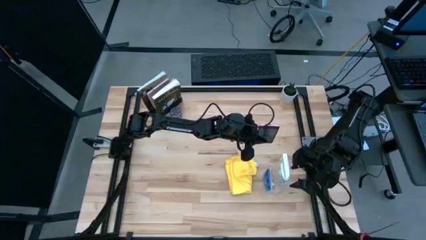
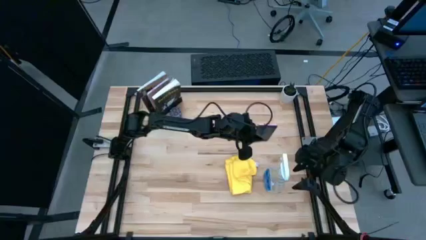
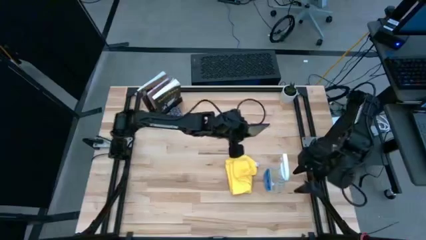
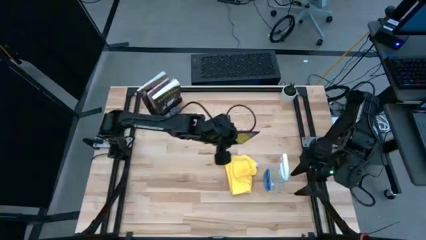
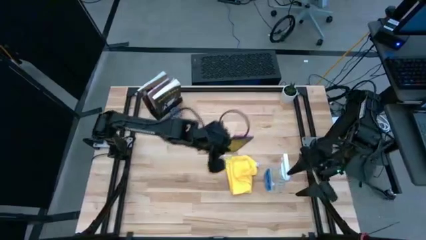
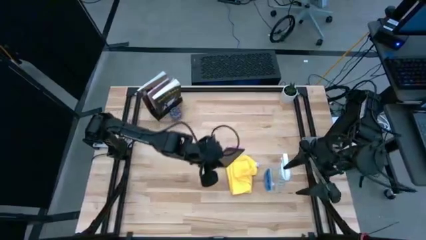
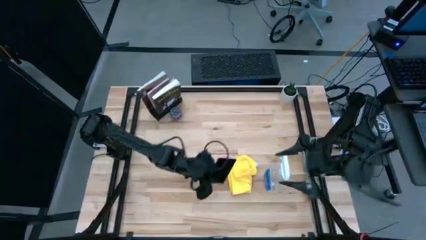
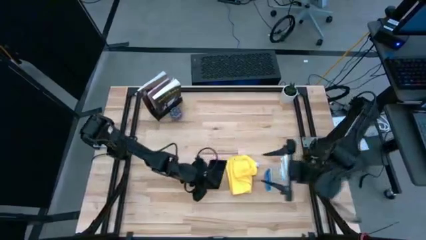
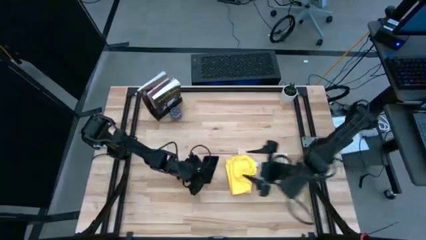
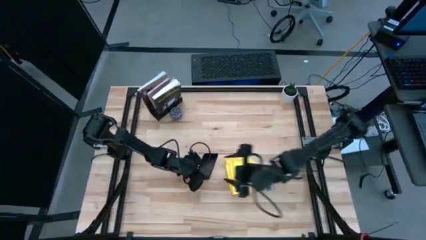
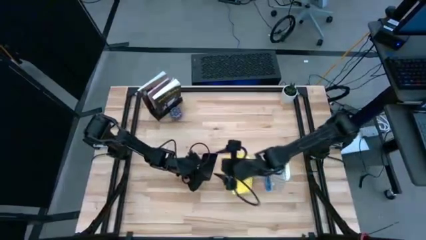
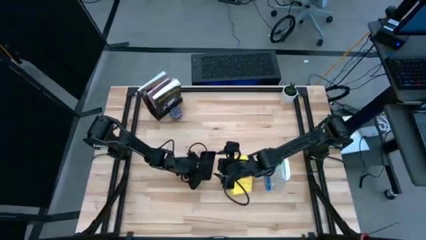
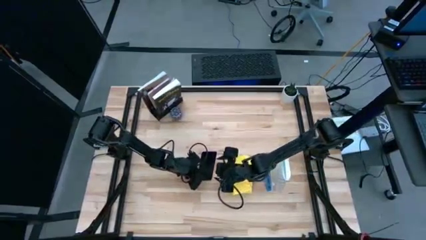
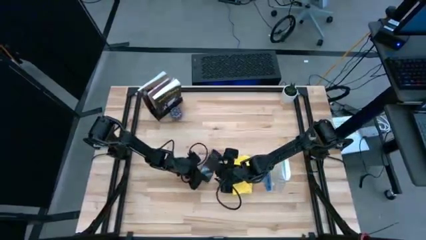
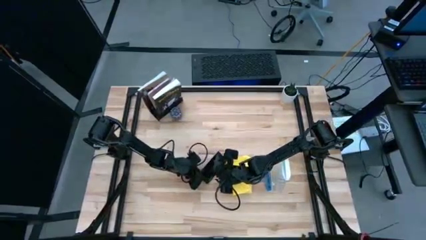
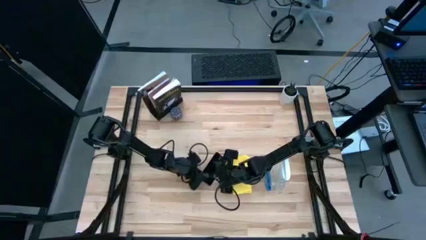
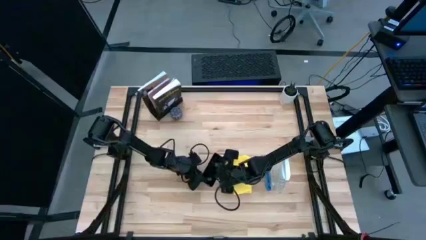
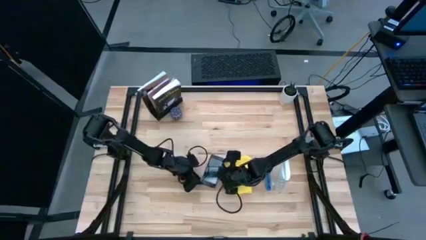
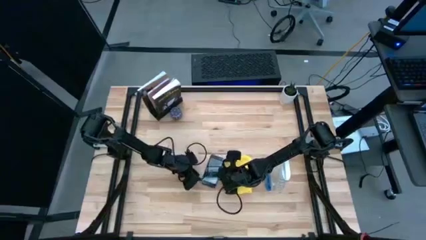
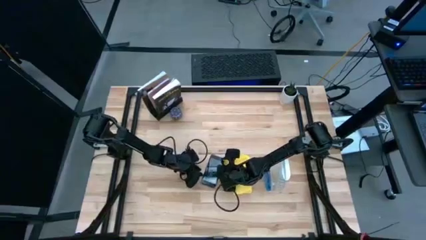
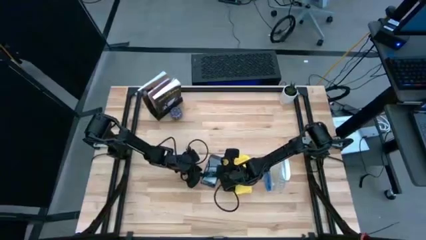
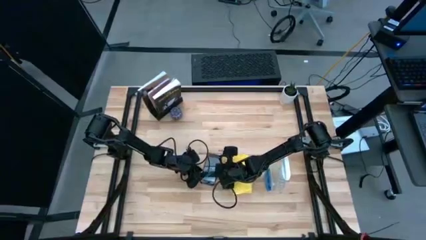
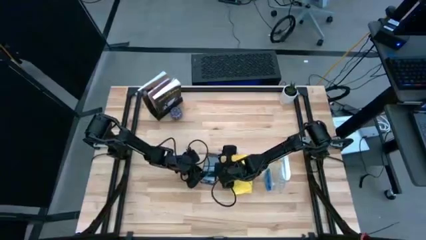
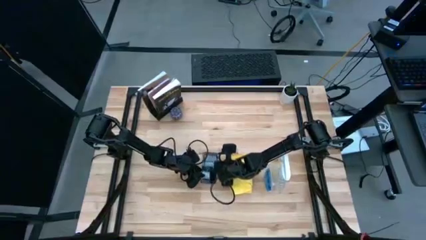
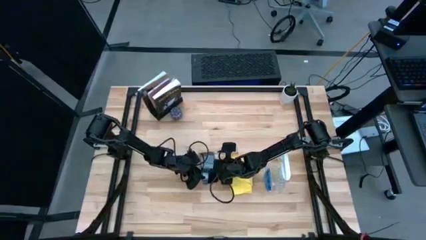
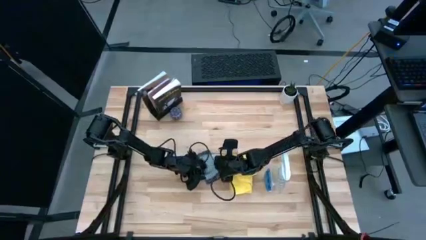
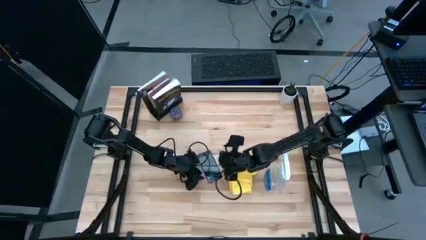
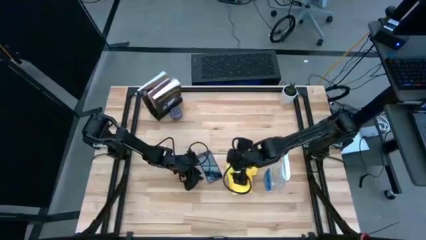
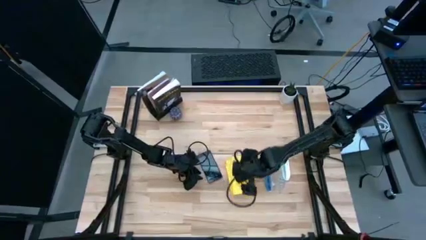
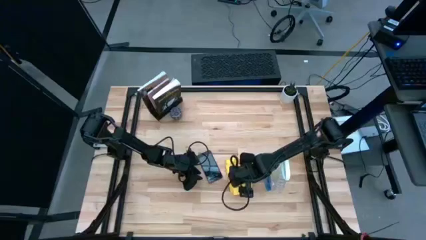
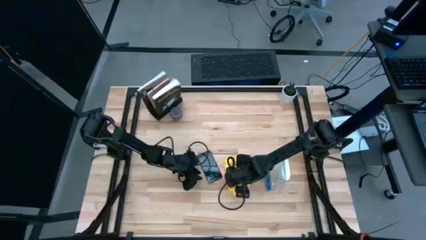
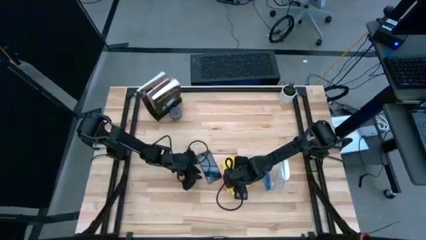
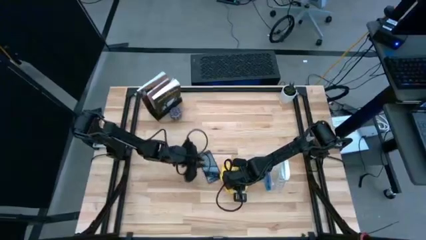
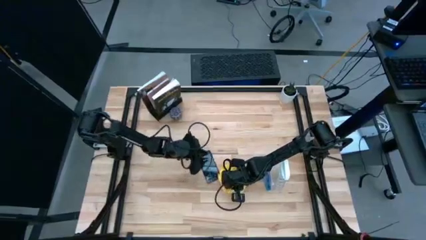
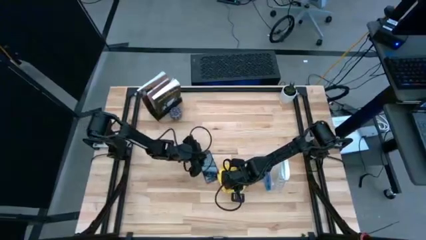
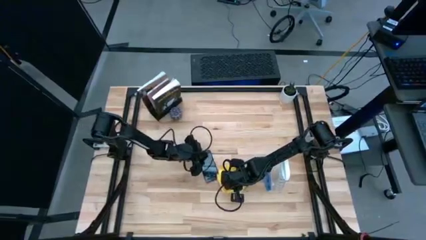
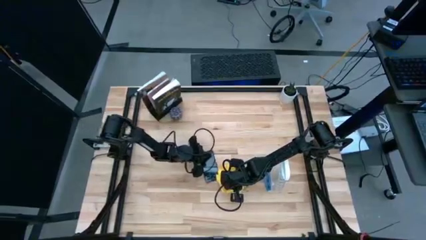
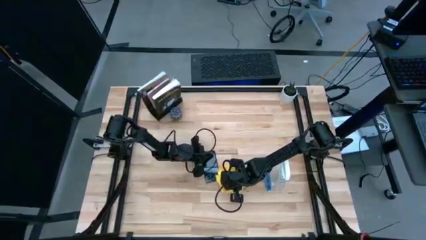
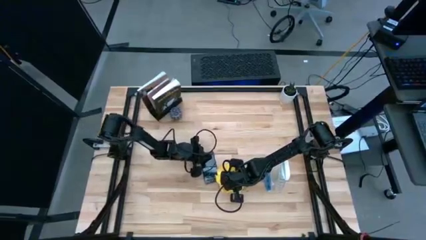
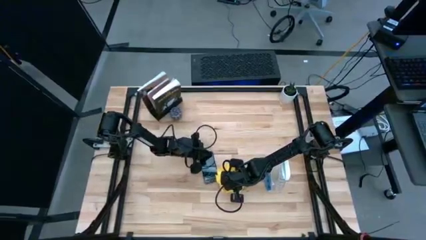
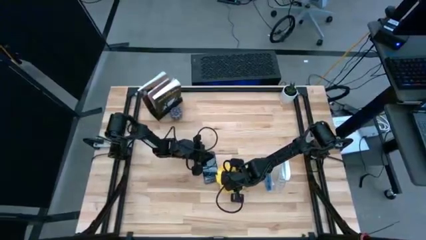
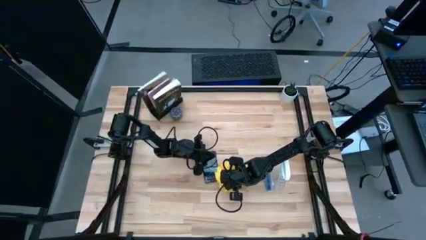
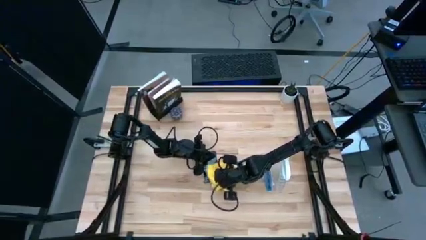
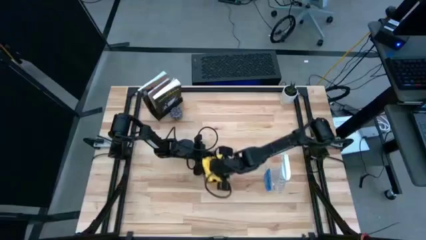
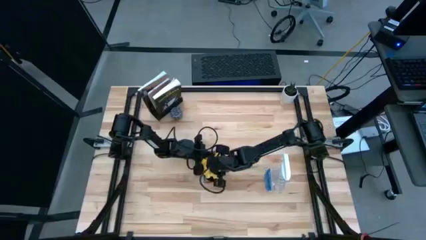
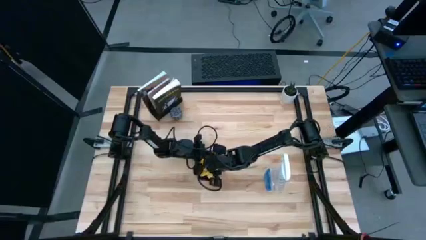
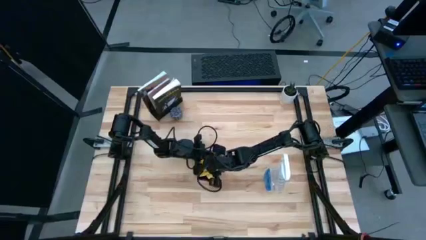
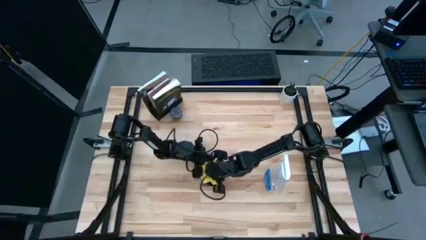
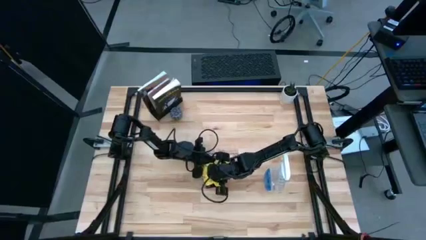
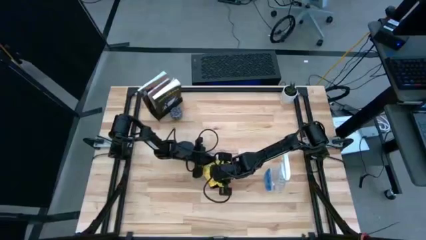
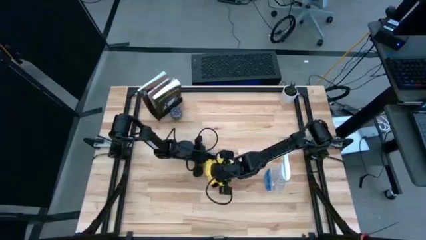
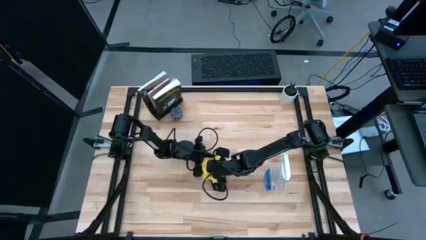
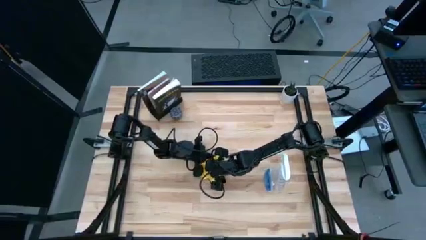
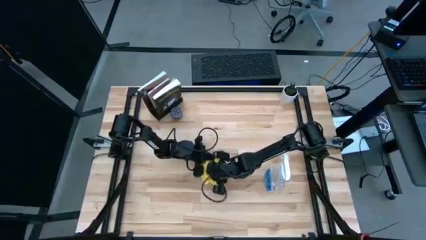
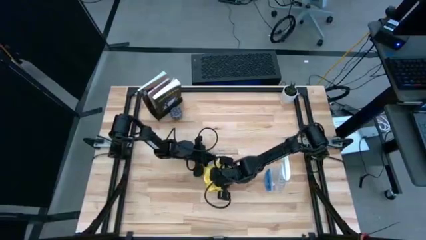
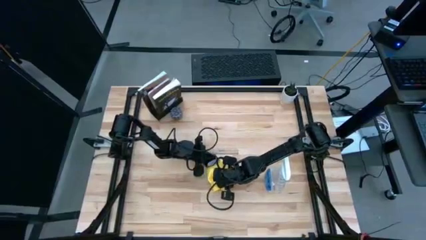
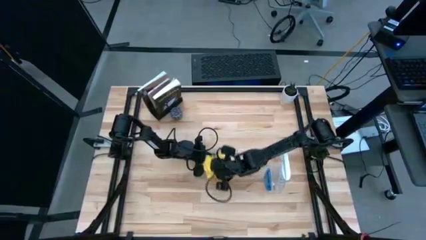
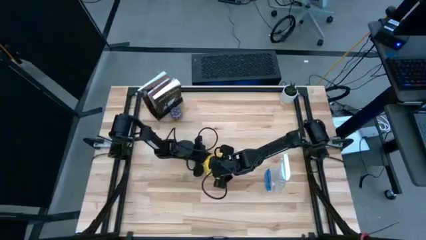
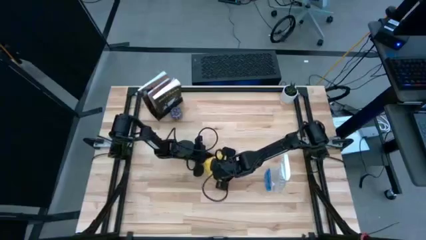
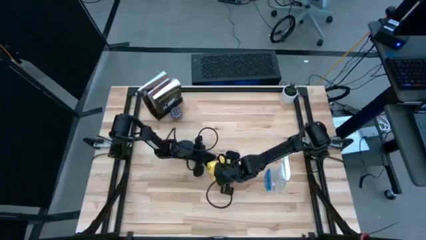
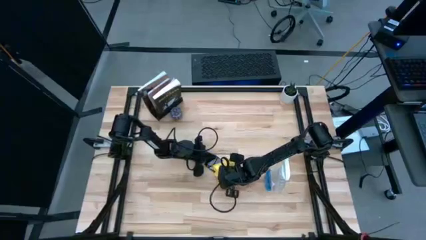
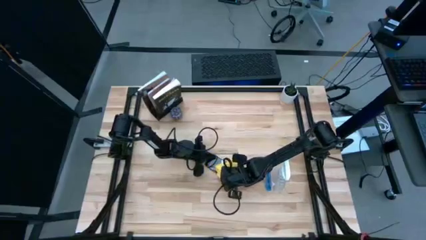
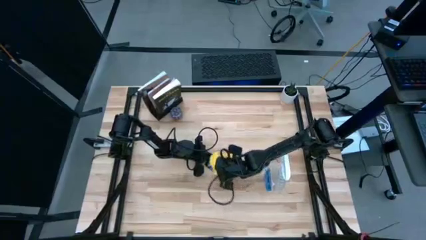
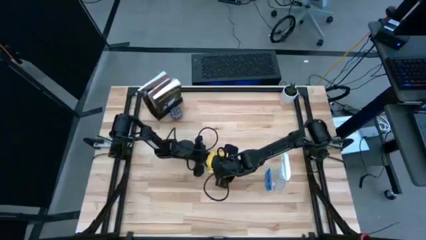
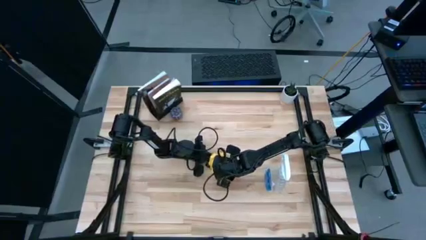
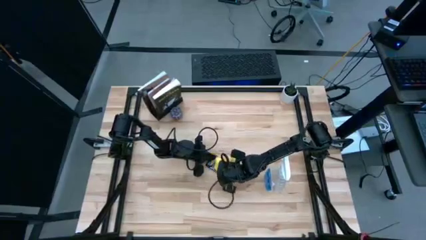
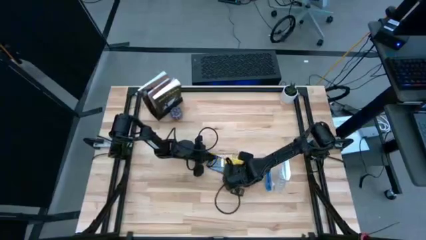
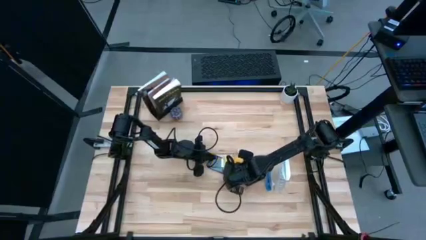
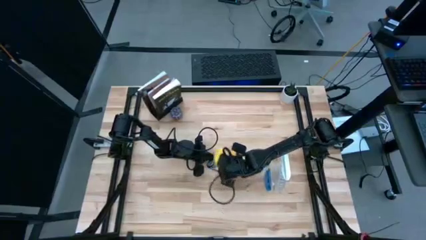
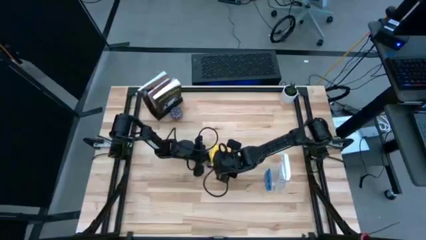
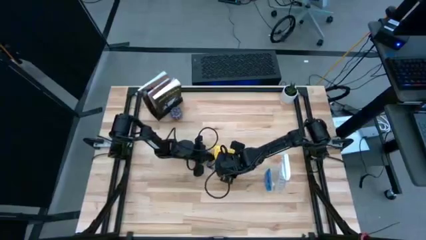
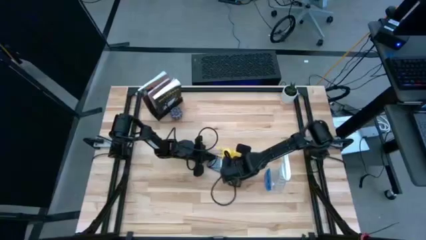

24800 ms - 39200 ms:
Task: Apply microfiber cloth
Wipe the front of the pink cellphone with a yellow microfiber cloth
